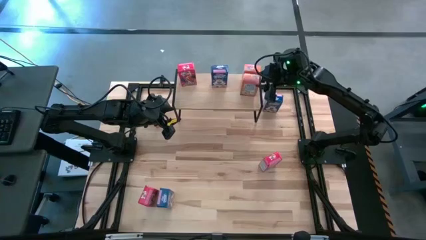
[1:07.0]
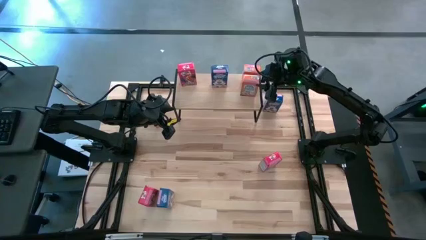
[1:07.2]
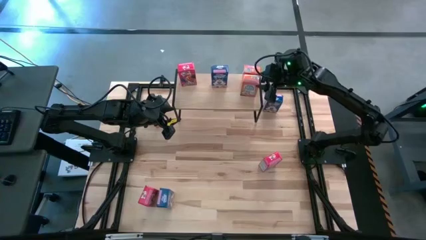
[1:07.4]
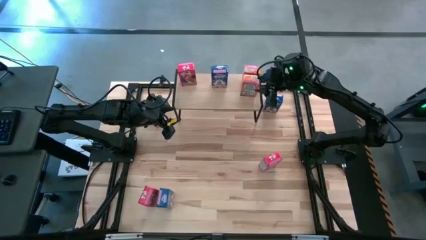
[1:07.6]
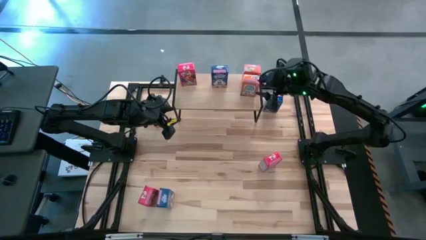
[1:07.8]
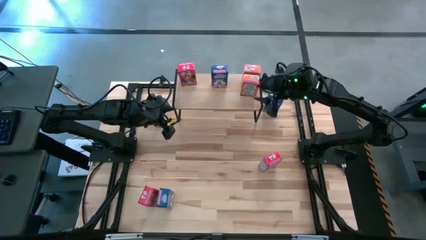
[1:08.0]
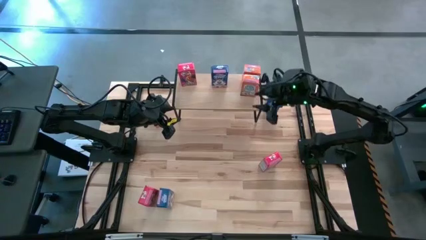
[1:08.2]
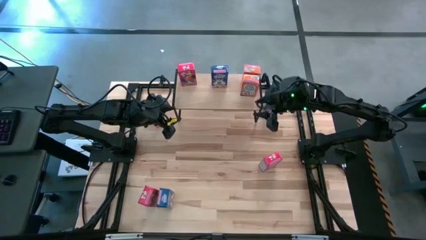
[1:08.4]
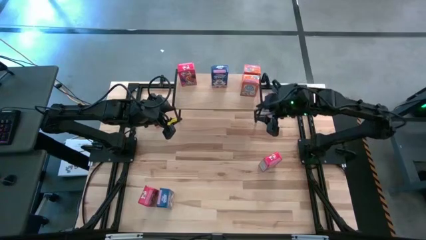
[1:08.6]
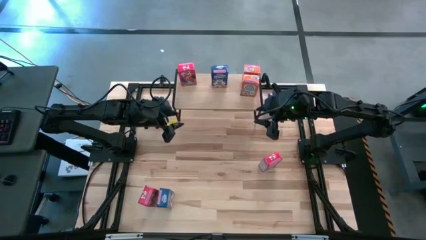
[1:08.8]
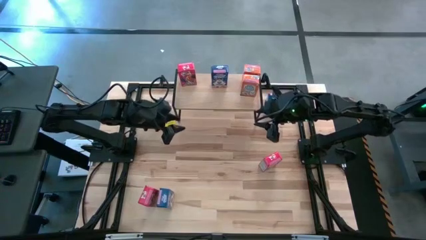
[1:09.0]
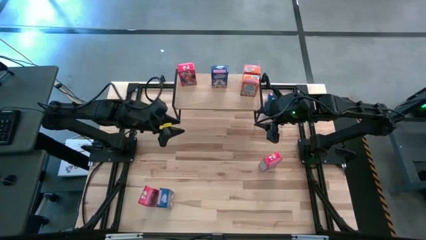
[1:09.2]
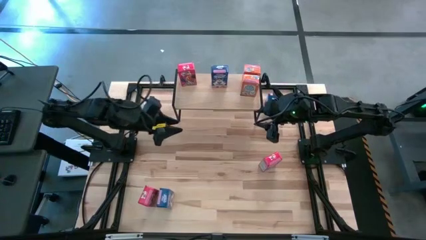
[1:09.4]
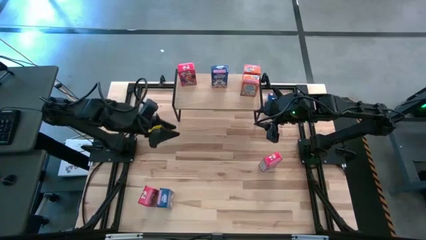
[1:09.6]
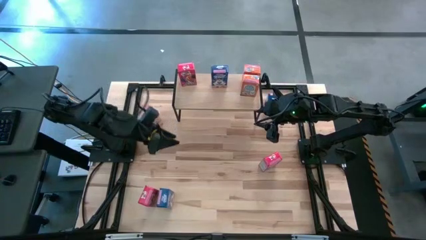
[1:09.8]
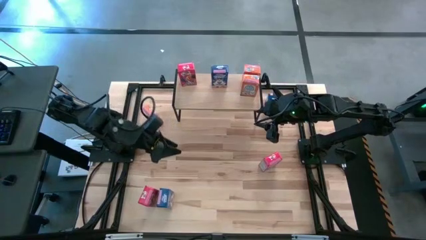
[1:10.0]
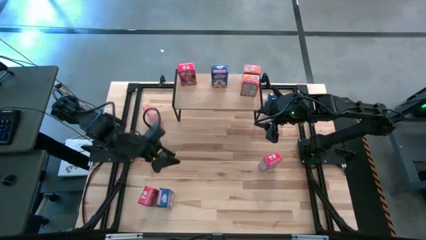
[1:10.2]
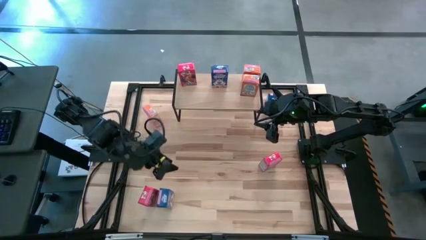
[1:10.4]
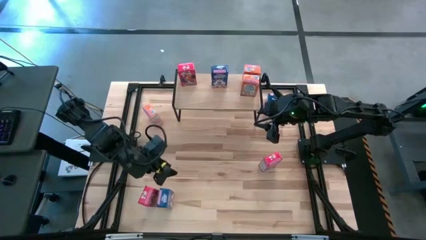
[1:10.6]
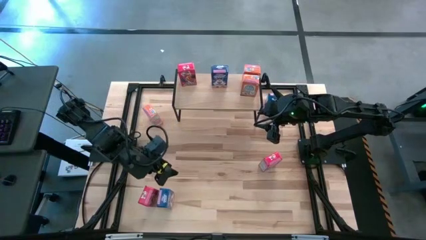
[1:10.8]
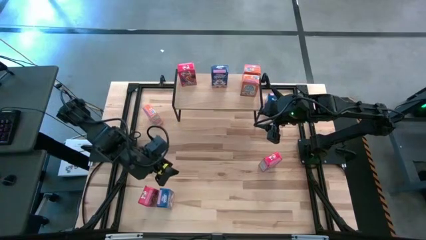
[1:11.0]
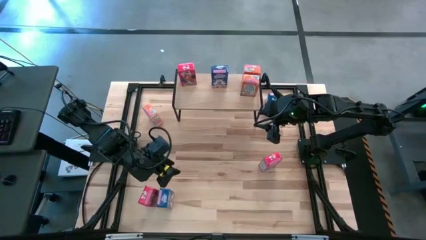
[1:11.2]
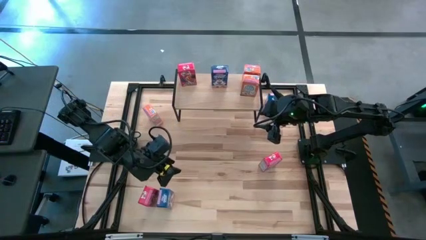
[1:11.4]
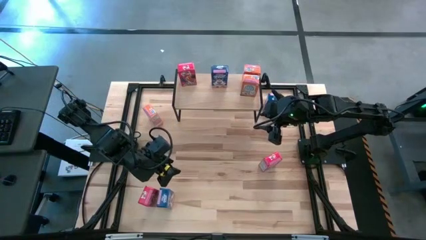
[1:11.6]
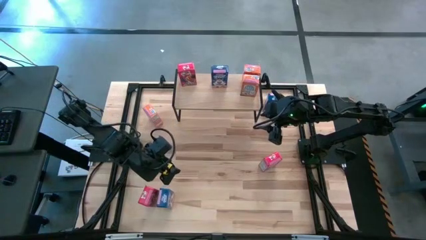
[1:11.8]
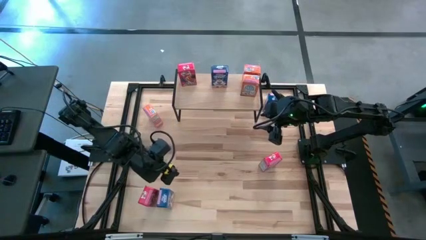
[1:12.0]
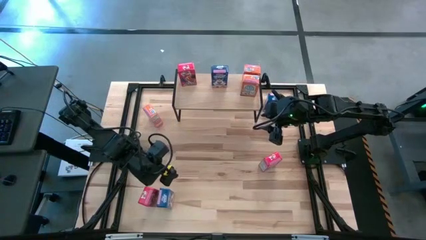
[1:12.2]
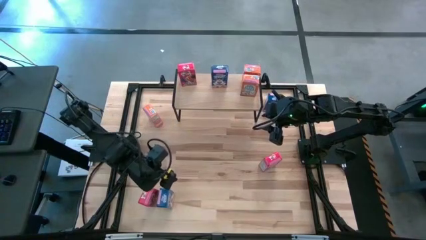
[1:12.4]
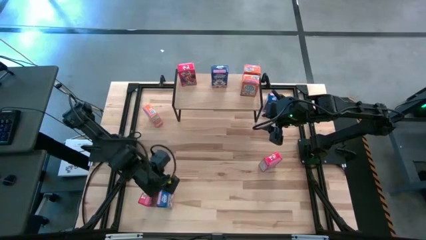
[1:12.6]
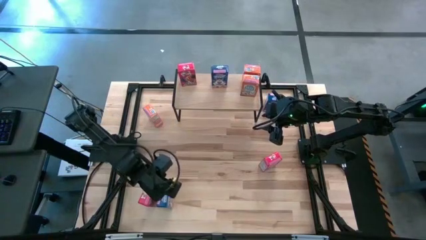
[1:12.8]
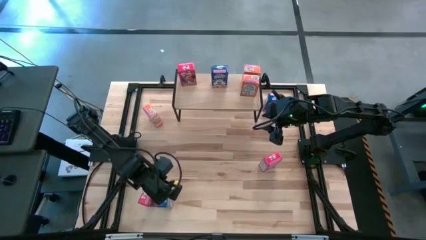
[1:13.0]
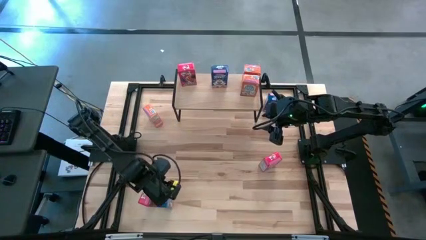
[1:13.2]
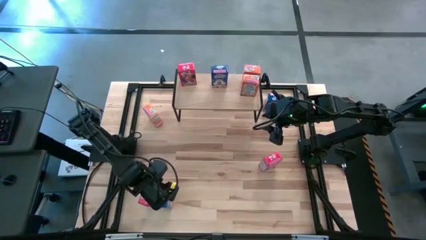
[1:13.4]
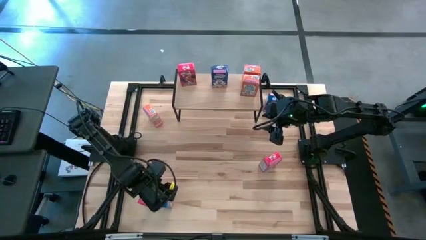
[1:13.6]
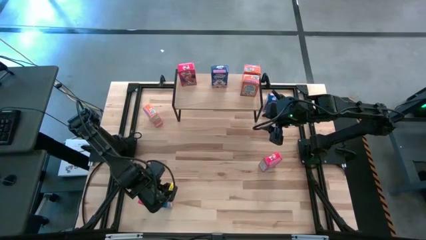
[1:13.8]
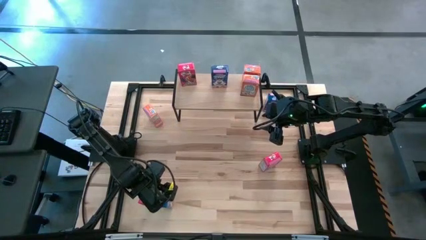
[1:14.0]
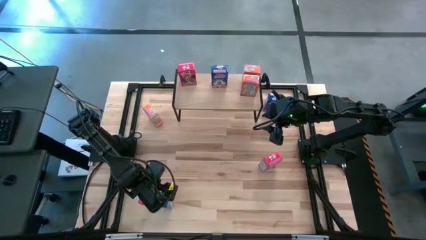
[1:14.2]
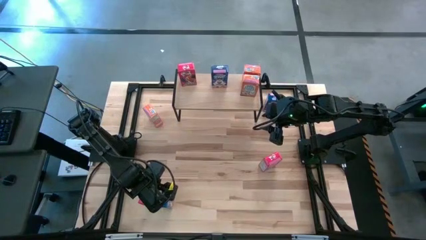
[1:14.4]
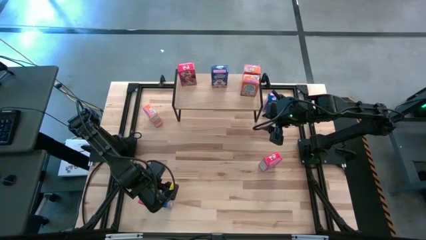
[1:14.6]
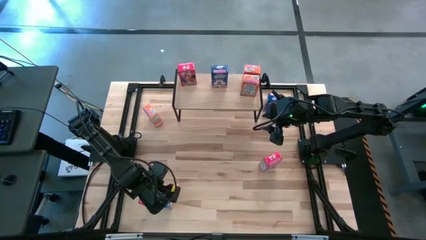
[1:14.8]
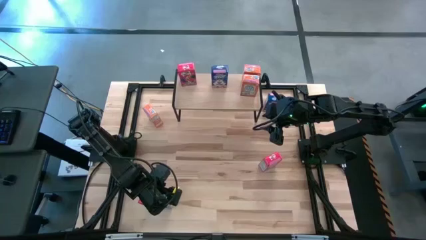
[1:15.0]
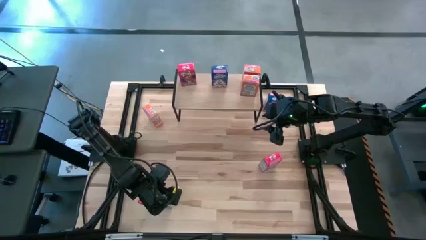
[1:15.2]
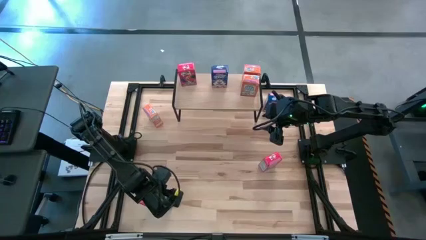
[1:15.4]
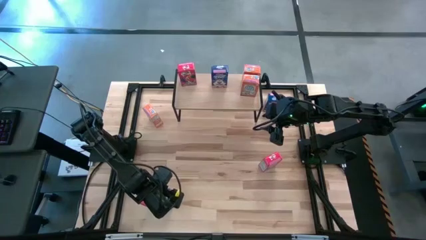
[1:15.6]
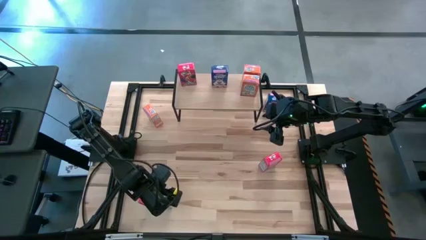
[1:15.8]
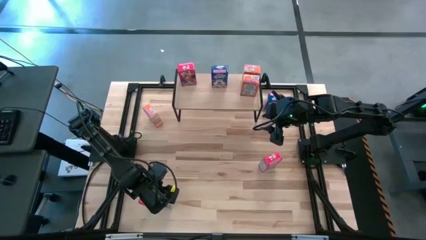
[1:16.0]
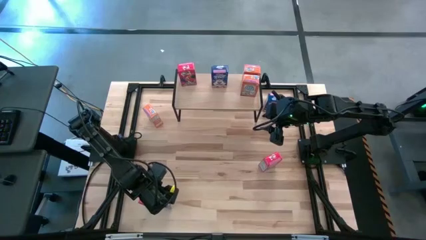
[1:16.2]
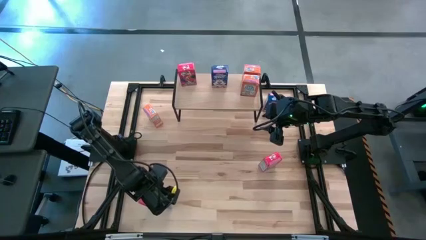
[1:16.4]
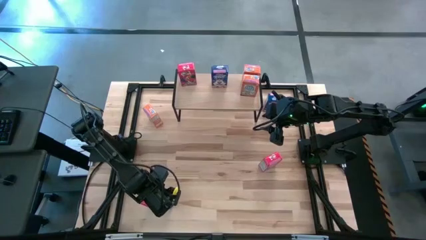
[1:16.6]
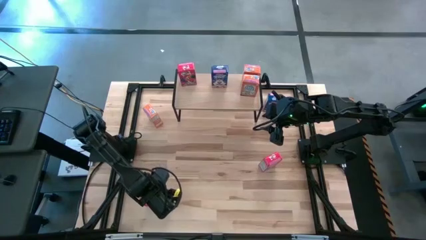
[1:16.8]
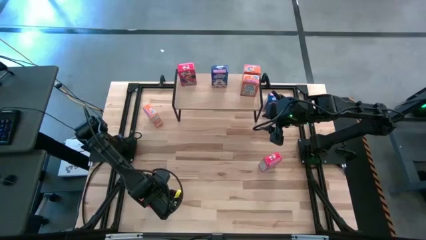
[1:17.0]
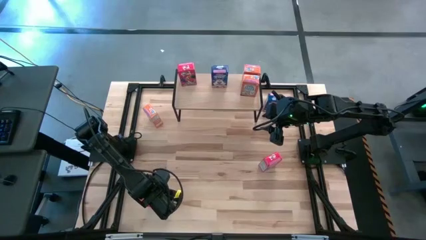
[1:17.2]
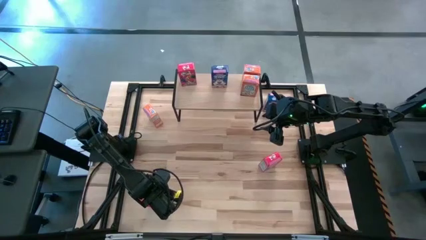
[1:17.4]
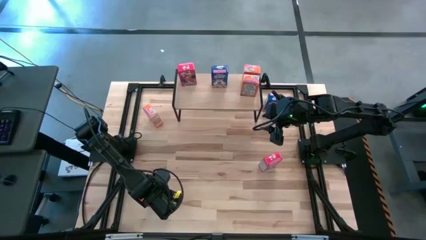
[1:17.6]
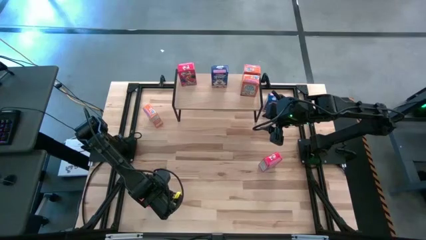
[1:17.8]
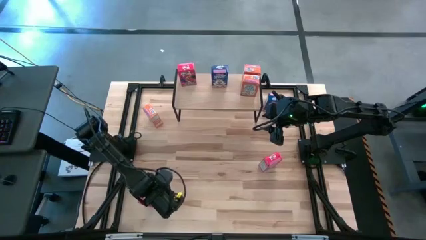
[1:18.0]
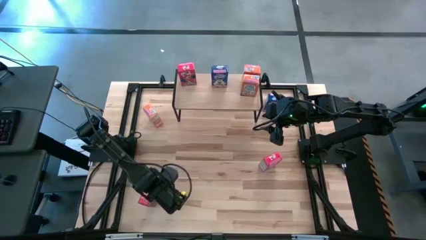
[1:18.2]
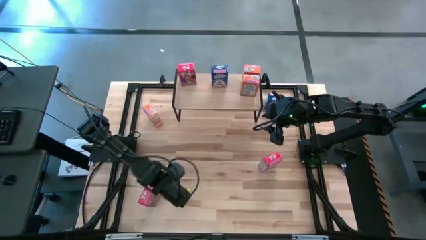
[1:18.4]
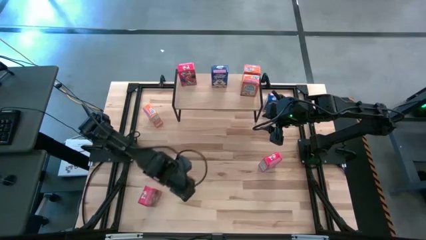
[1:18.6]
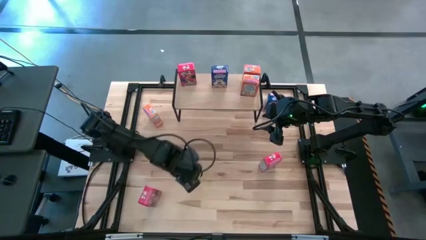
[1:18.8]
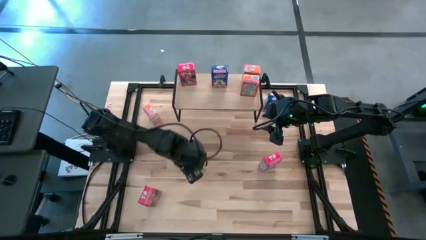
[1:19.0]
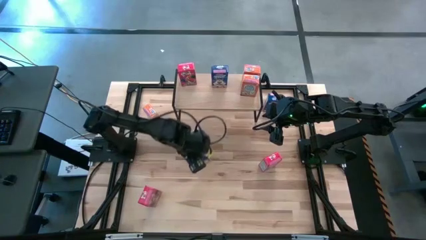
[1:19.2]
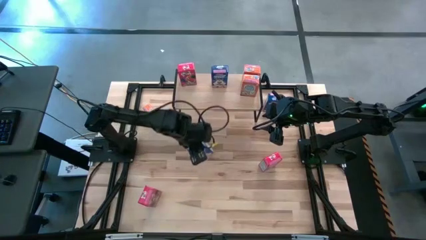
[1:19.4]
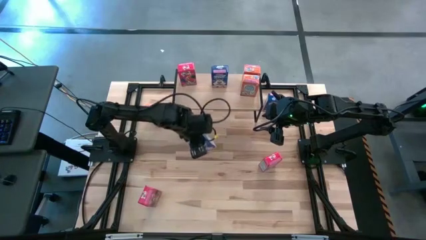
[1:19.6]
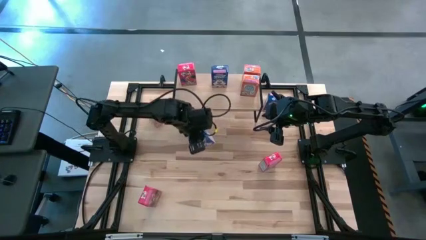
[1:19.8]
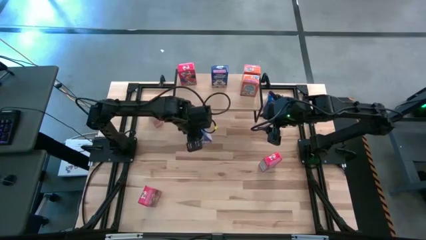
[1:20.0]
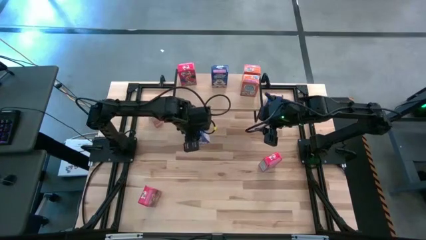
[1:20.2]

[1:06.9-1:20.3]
Task: Stack cereal on shelf
Put the bottom blue cereal box on the shelf

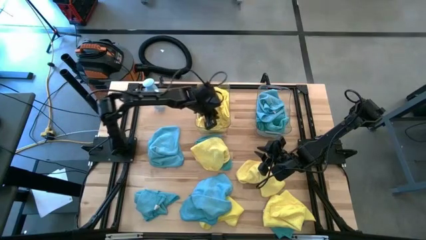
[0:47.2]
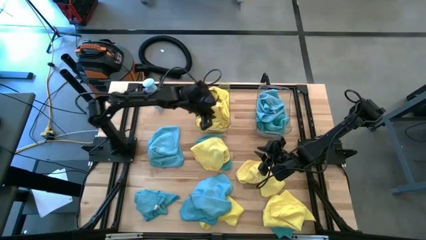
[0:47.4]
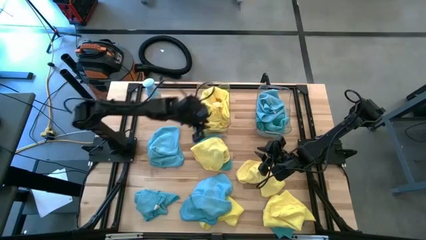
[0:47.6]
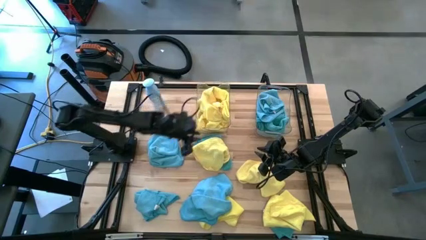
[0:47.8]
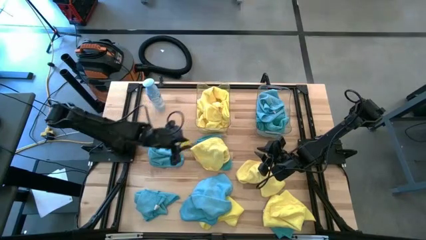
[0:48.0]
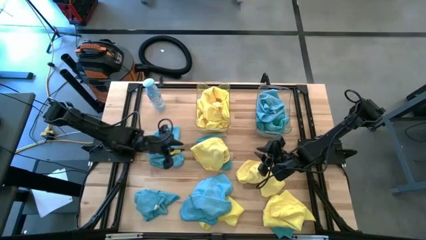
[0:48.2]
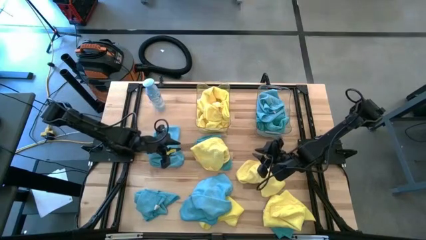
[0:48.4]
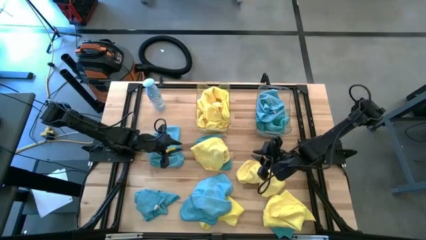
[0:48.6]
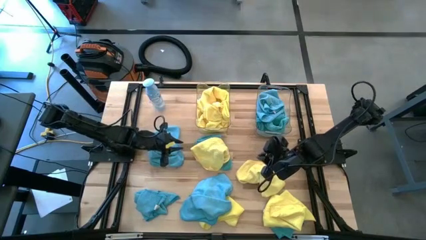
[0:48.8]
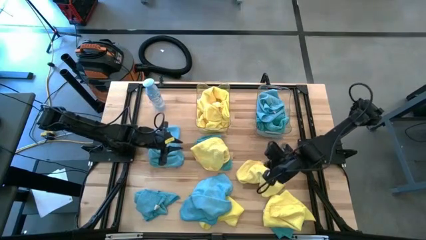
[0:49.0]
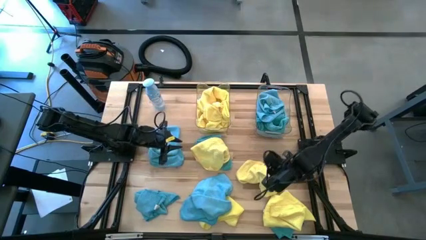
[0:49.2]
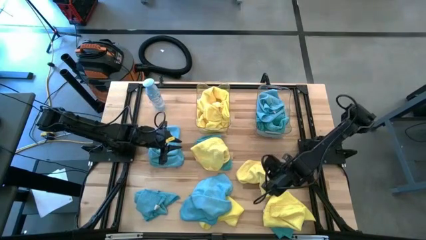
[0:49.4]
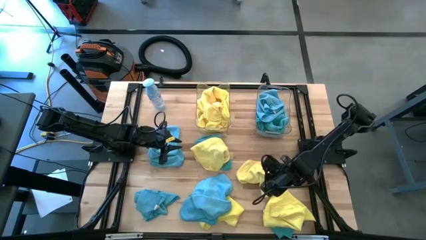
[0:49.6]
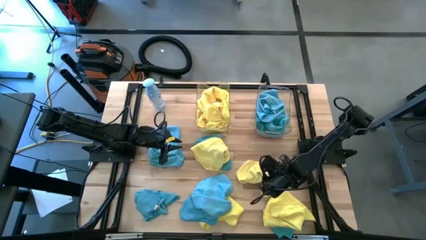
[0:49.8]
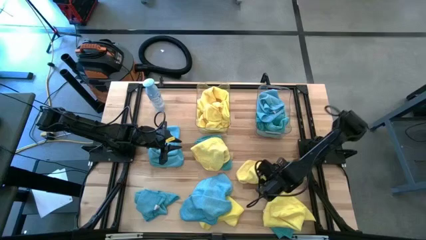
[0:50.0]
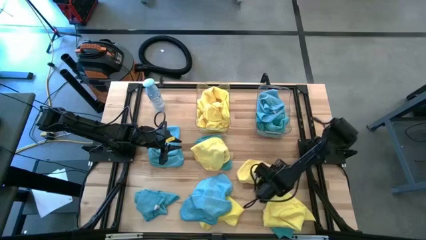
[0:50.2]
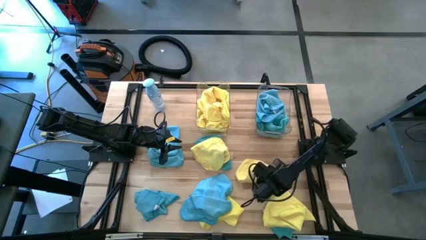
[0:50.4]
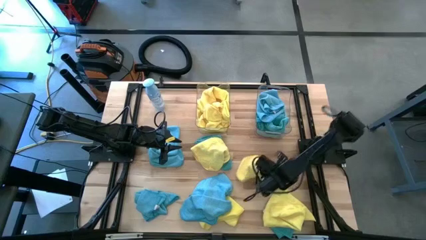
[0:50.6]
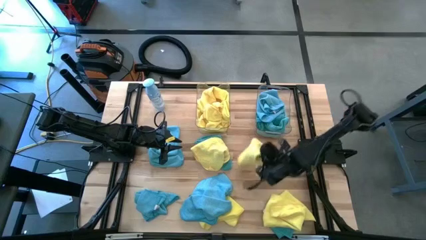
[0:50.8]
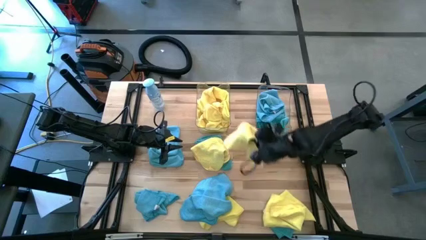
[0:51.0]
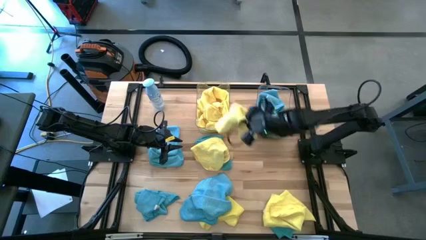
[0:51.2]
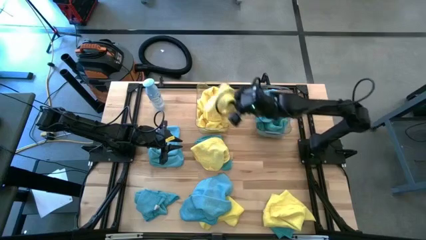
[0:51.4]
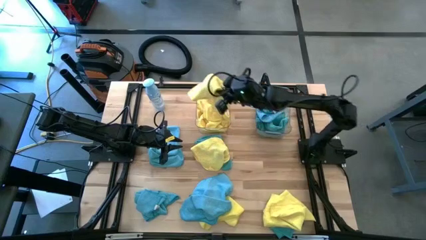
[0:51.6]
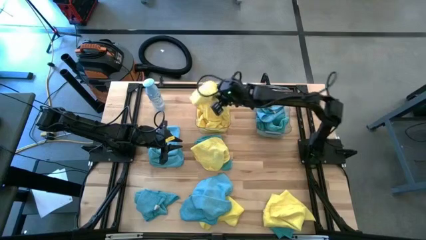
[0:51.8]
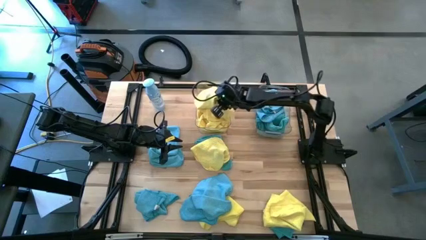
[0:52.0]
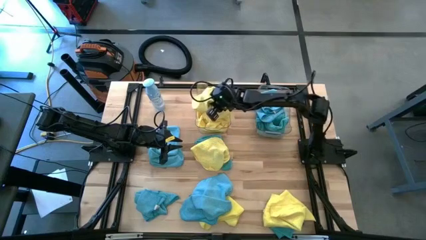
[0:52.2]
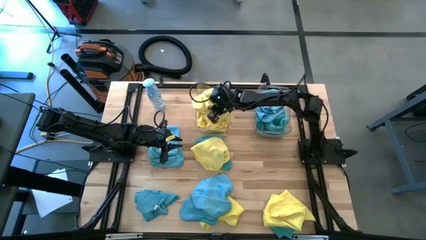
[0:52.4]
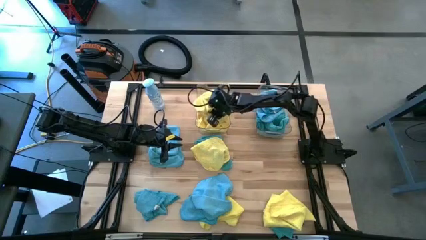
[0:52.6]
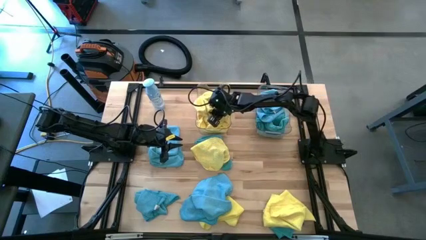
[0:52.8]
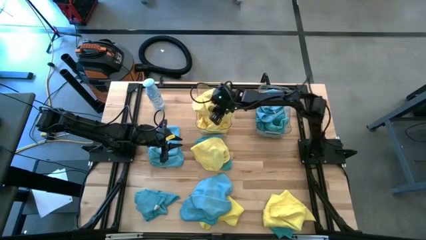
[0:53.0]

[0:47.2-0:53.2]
Task: Sort microfiber towel by color & place in baskets
Put the yellow towel into the left transparent bin
